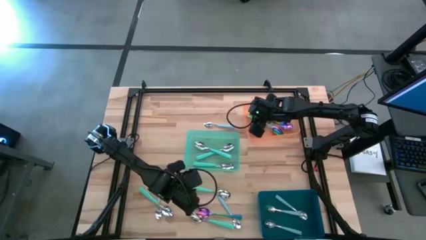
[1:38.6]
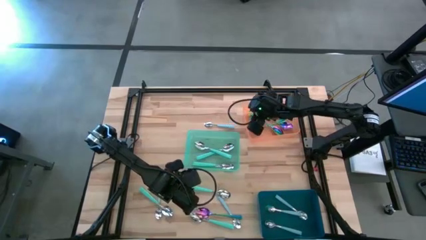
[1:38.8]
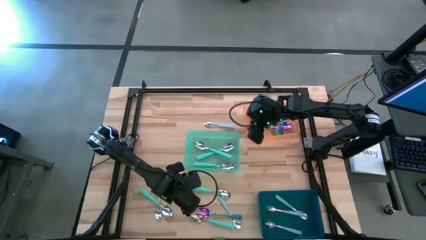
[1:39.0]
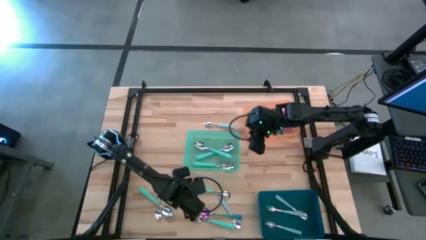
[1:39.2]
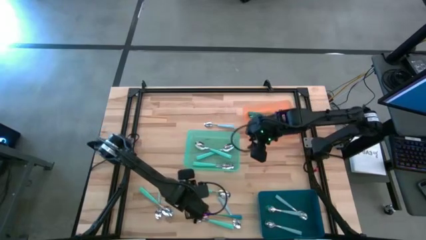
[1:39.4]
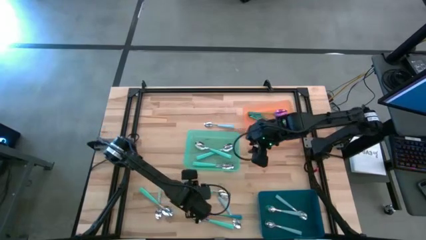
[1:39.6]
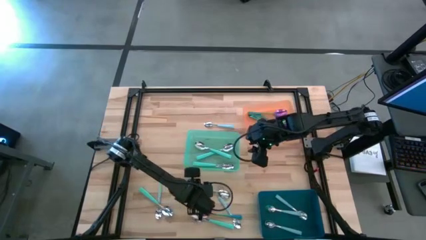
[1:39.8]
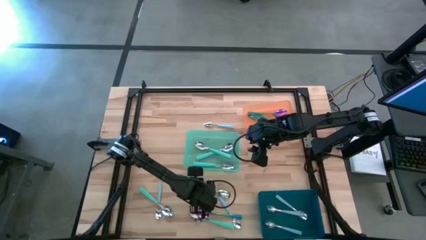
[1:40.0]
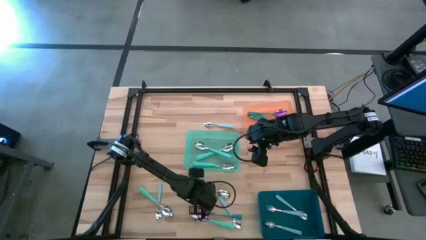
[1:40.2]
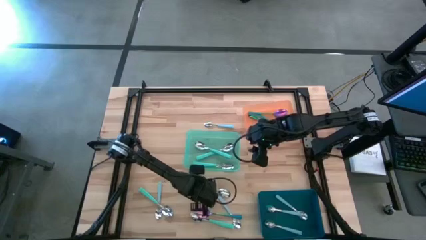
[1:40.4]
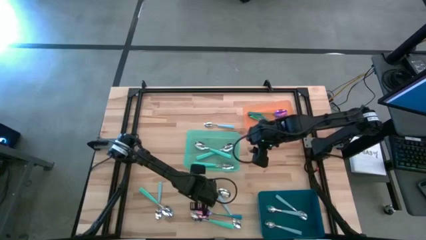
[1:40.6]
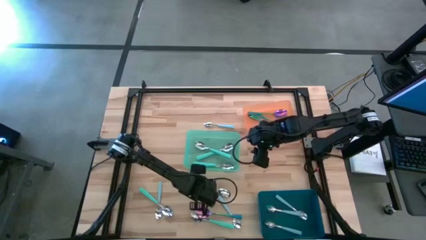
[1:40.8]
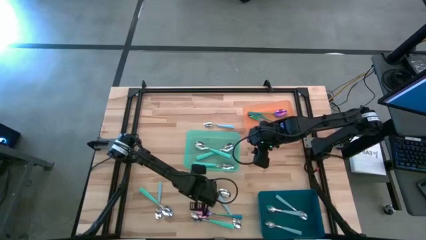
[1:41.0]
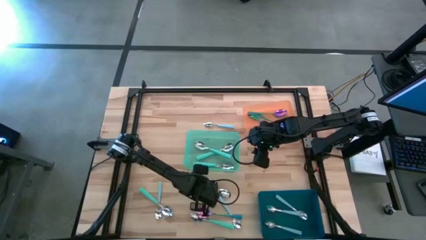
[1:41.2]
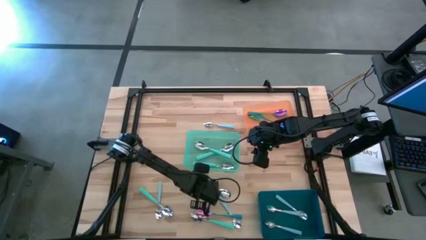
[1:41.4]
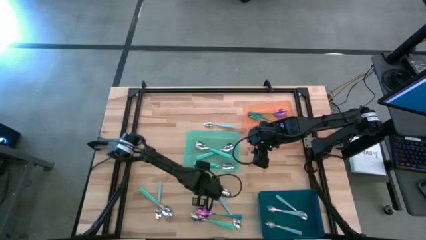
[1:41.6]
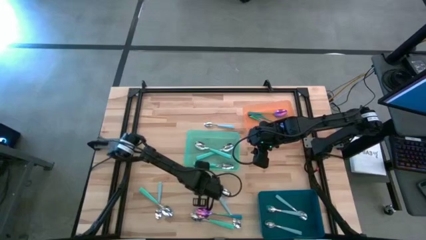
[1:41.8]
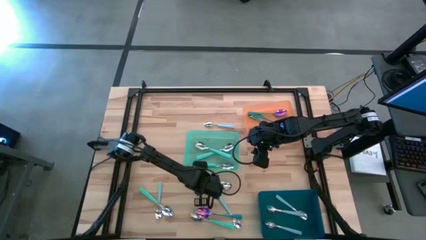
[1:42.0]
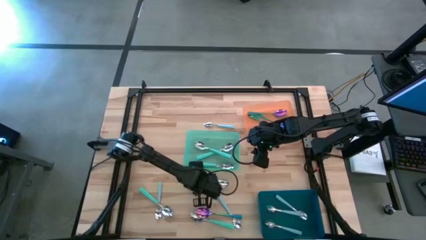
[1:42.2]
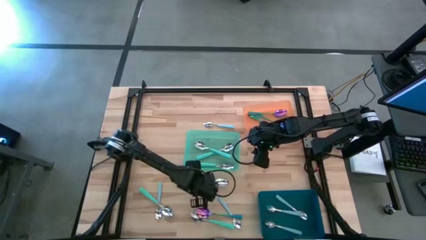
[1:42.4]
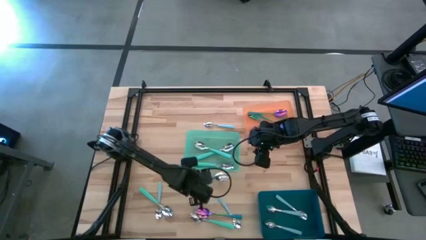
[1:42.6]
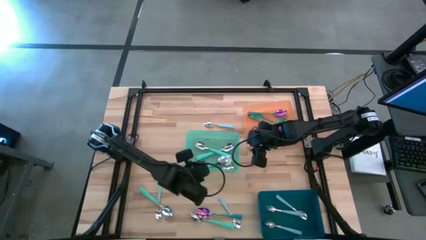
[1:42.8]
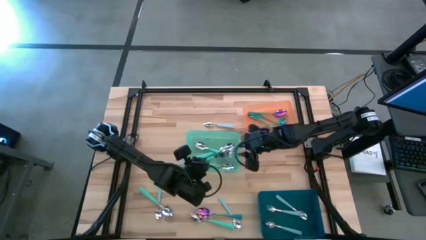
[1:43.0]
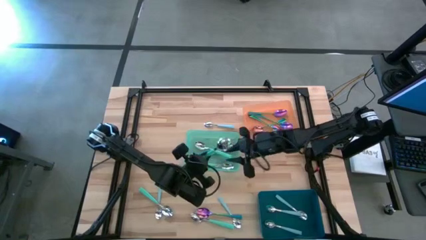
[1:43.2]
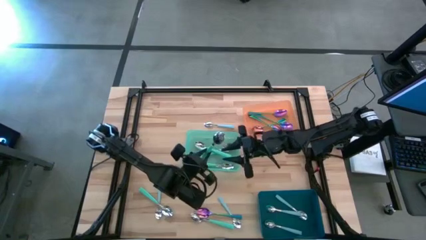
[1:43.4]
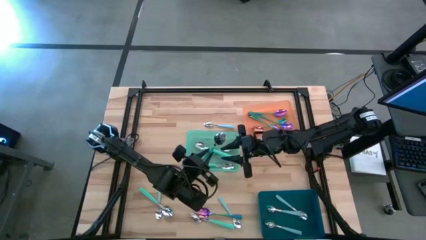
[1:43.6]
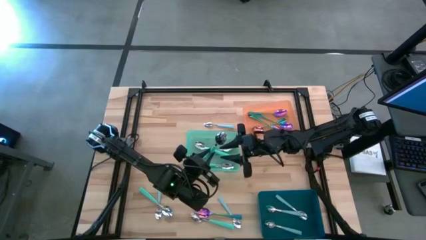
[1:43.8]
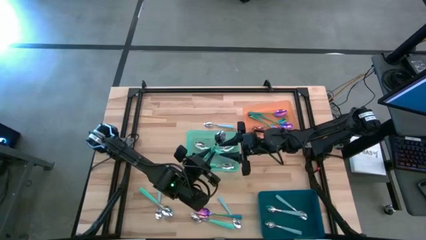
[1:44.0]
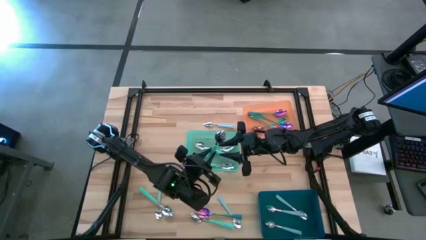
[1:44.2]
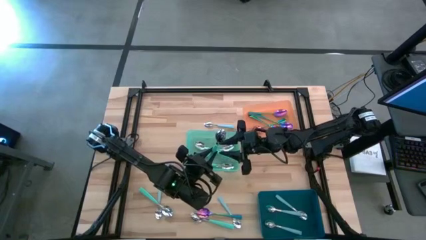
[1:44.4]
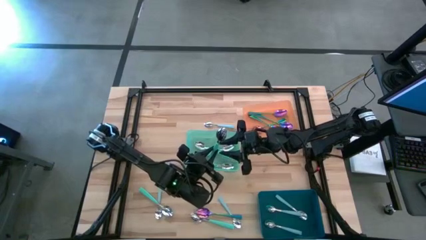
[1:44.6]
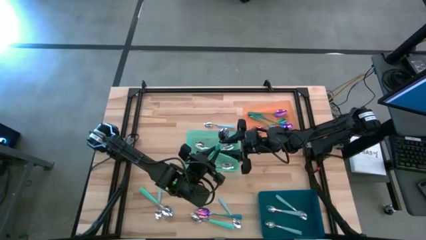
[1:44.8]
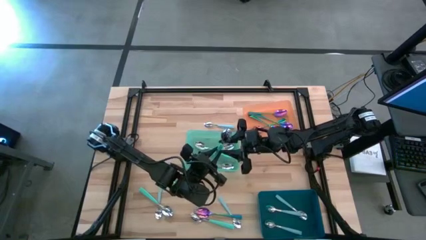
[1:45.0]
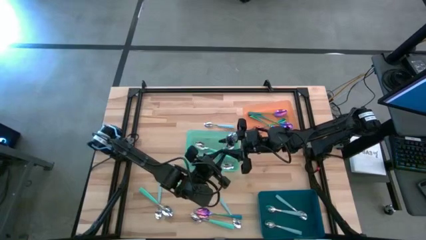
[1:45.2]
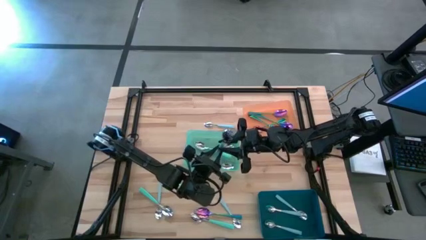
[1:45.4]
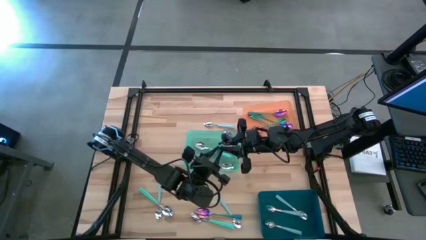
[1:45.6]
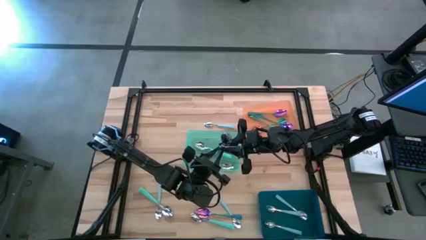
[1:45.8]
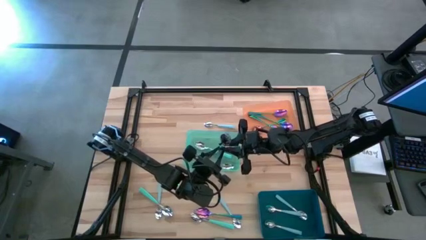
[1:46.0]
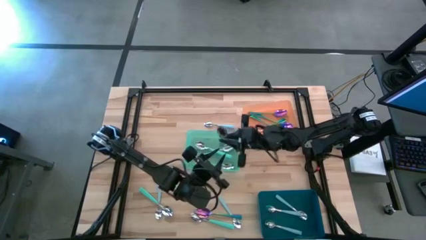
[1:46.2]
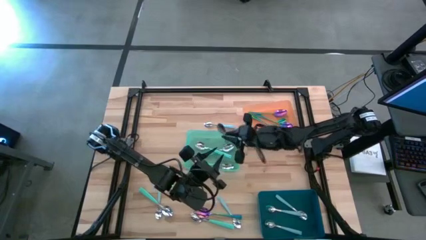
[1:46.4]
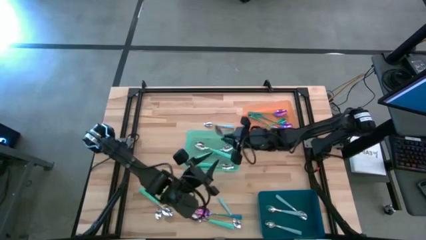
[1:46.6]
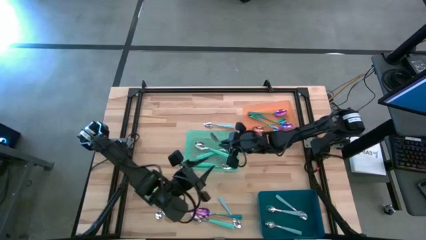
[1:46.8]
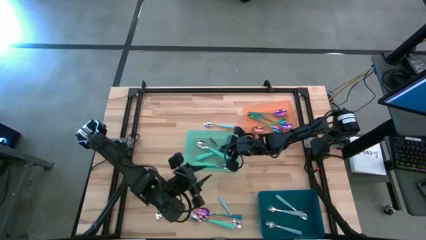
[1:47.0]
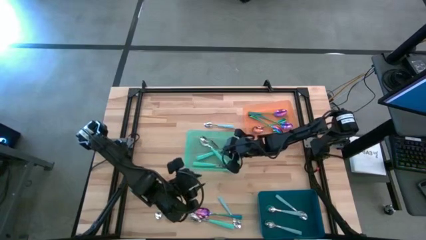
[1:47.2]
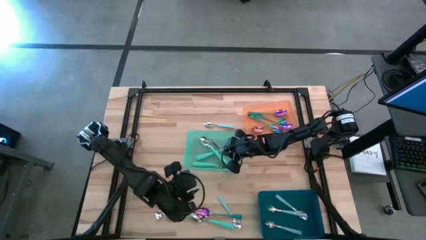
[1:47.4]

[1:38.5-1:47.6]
Task: Sort silverware by color (type)
Put the green spoon into the green bin

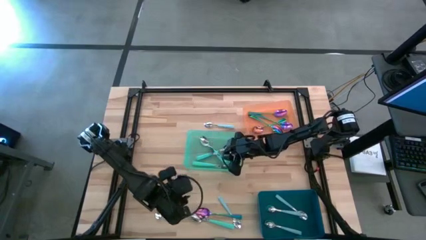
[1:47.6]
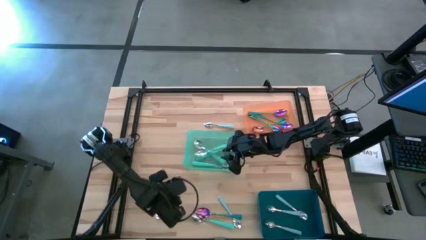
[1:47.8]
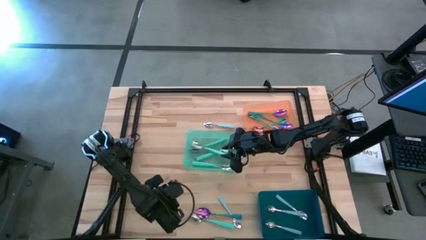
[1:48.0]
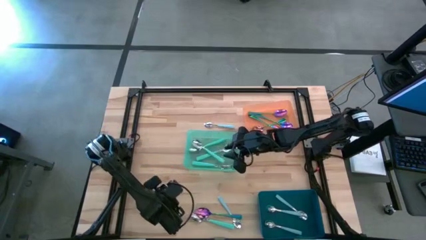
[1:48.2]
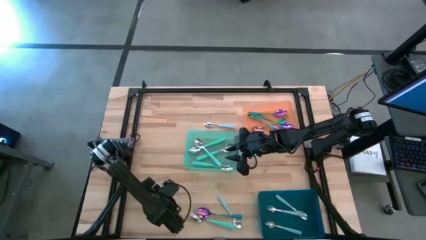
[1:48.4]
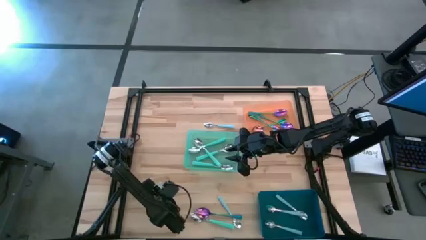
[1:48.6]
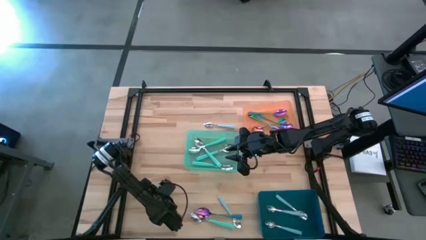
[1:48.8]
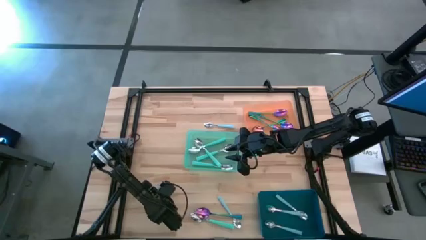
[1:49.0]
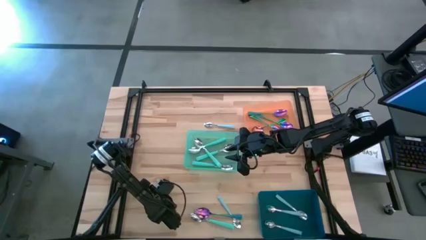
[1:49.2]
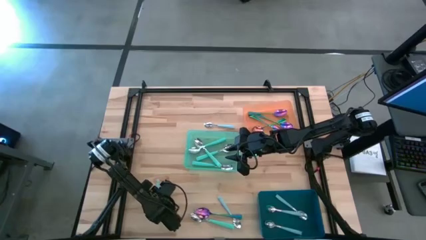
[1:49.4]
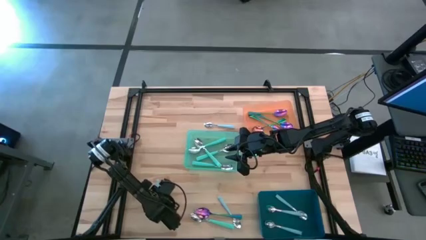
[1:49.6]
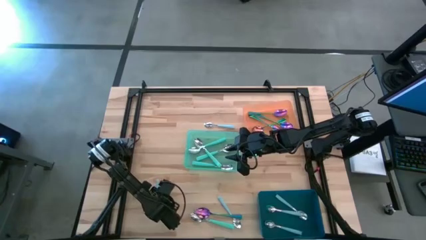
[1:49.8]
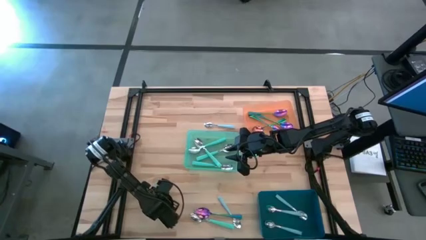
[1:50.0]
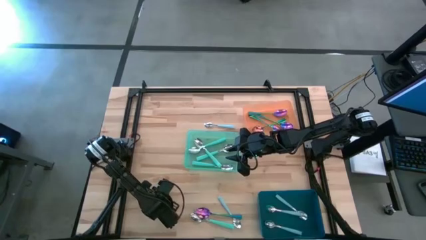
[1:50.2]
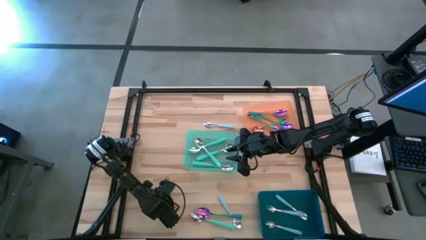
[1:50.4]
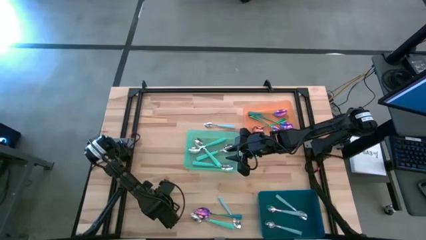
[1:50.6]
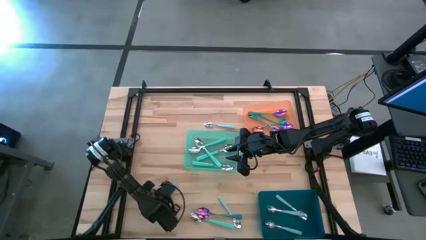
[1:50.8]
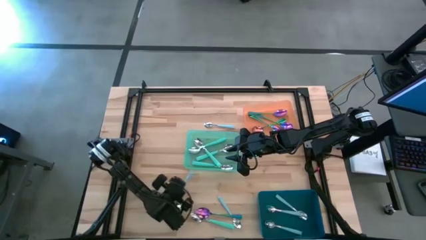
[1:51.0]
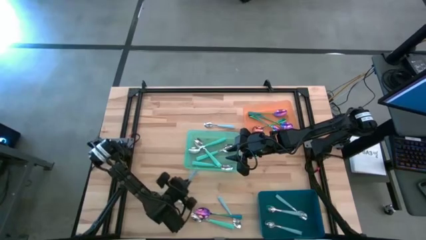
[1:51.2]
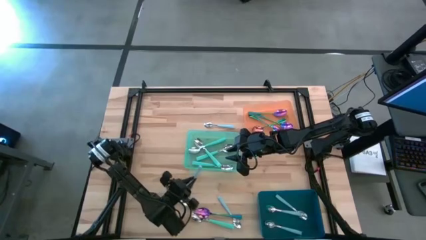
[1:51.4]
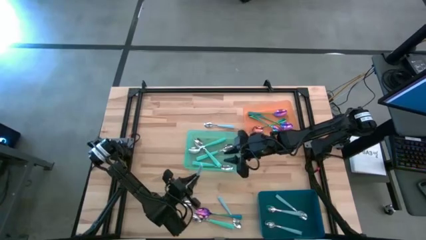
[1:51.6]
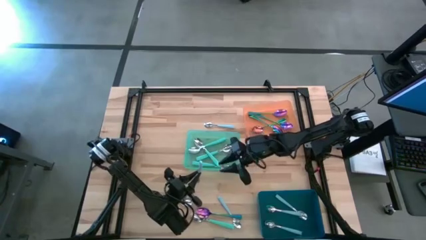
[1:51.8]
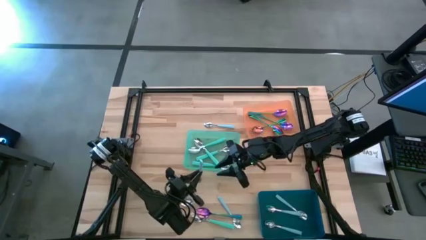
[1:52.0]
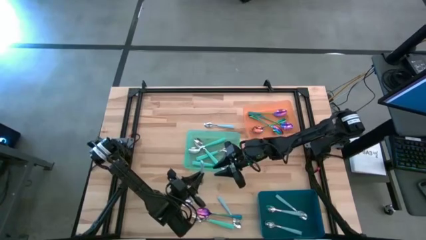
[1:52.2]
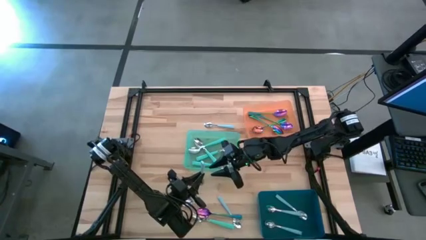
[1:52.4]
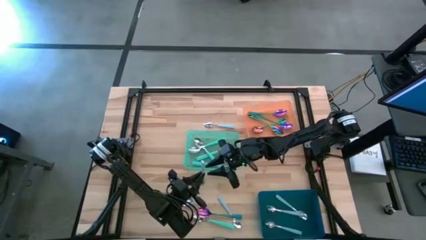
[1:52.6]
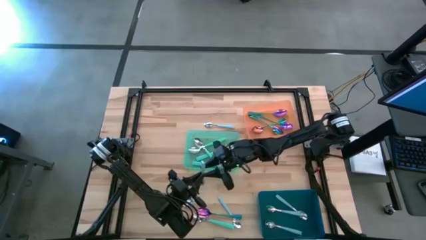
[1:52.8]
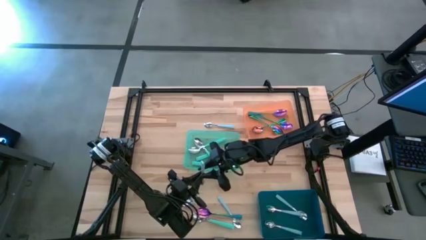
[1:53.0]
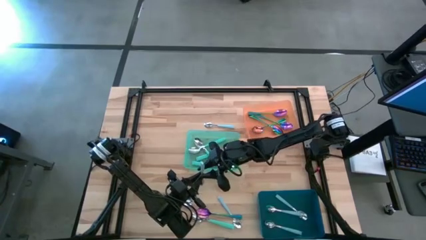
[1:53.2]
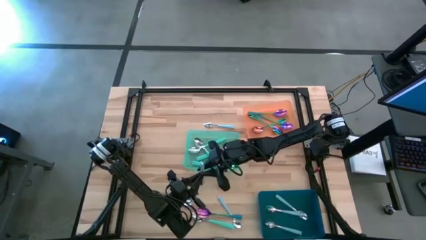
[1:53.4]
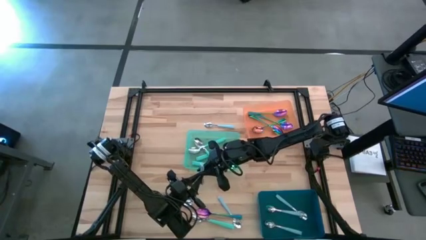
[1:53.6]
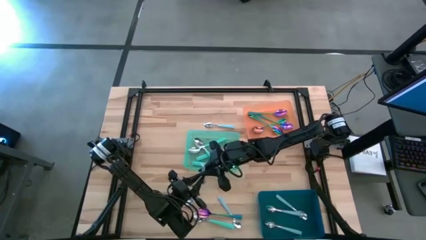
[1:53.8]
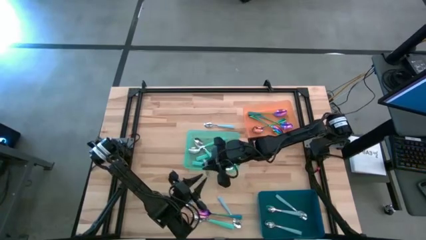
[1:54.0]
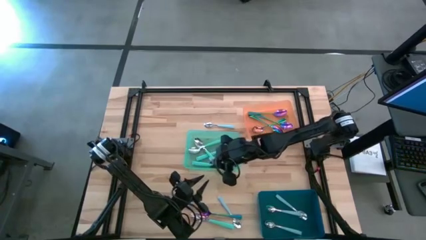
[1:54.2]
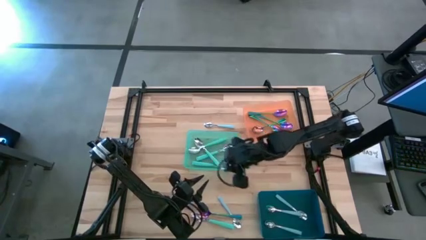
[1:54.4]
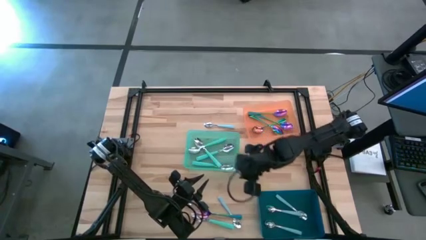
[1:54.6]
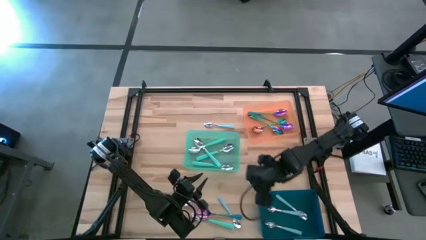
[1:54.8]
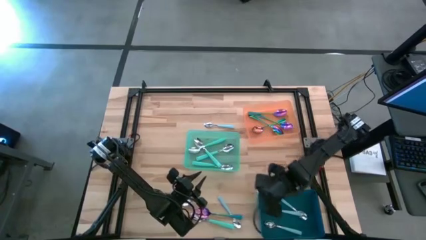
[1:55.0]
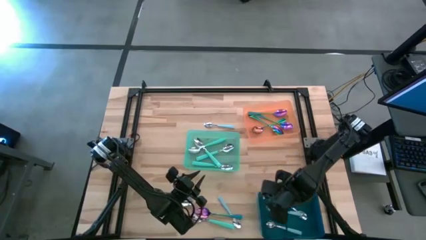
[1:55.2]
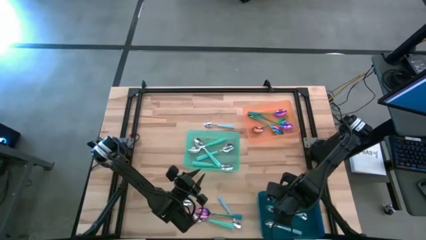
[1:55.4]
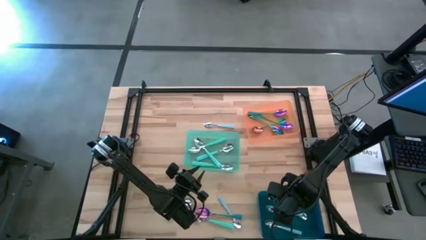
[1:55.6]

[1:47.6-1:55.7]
Put the blue spoon into the blue bin
